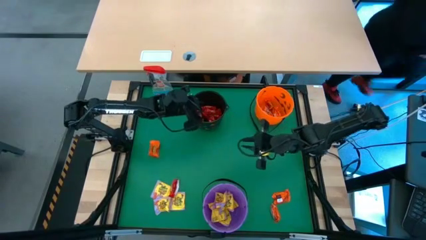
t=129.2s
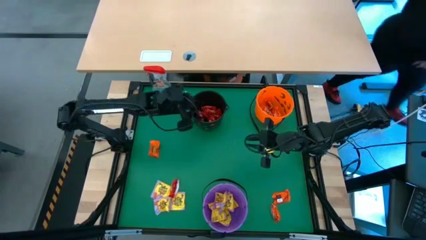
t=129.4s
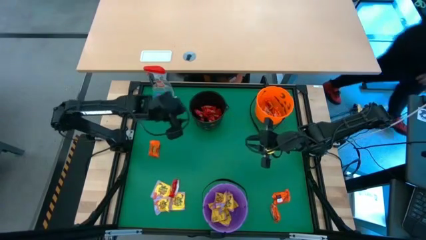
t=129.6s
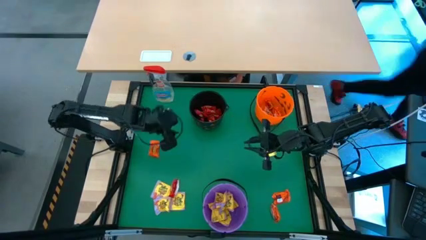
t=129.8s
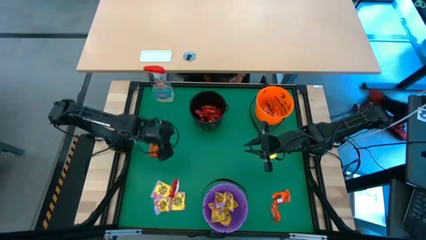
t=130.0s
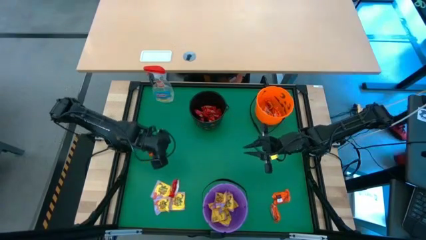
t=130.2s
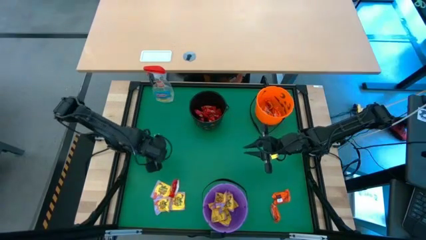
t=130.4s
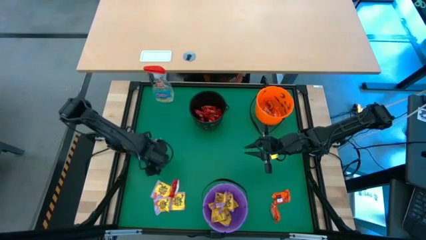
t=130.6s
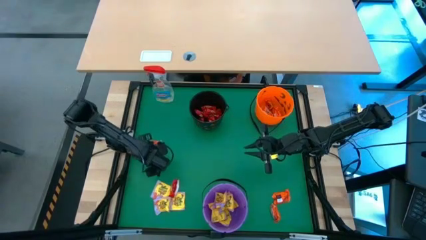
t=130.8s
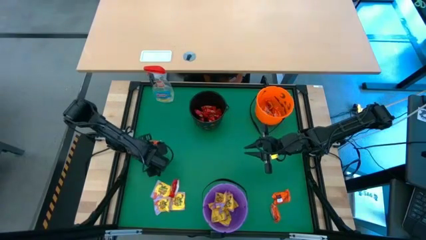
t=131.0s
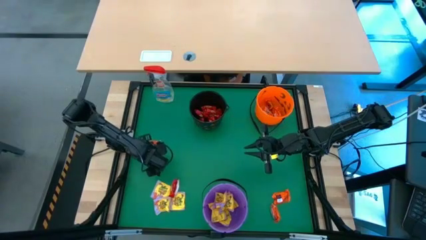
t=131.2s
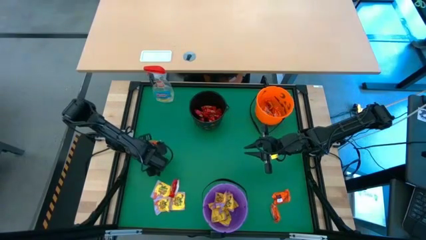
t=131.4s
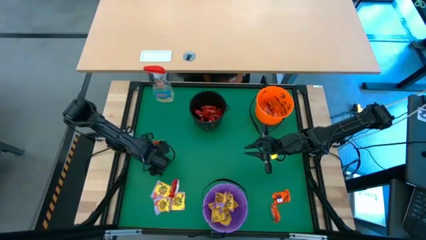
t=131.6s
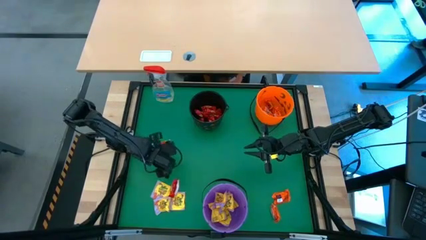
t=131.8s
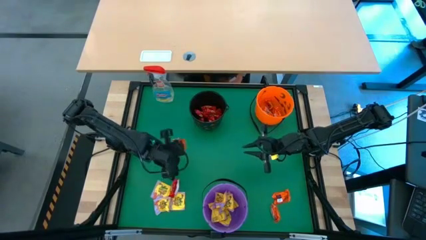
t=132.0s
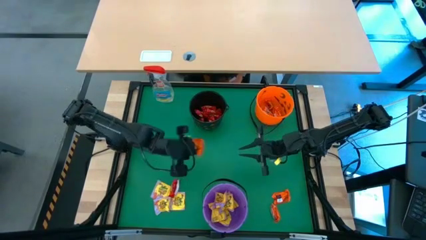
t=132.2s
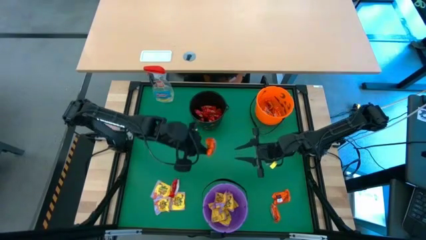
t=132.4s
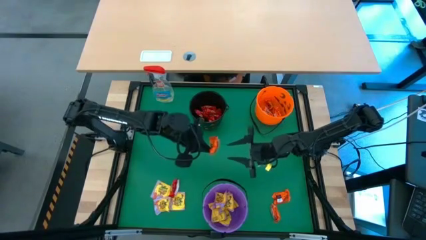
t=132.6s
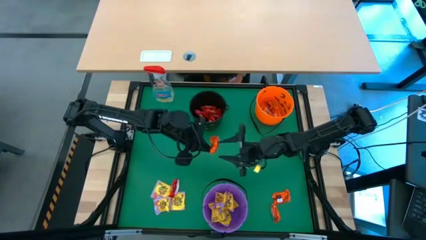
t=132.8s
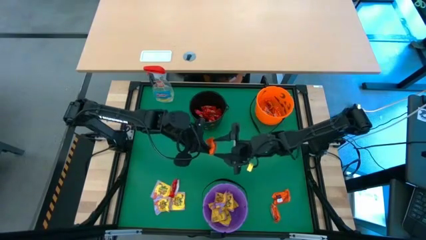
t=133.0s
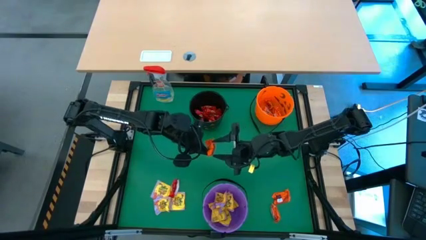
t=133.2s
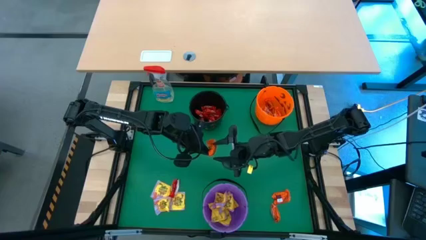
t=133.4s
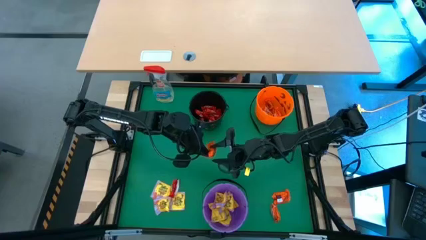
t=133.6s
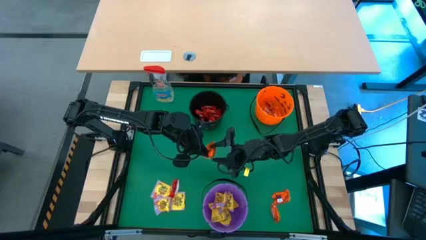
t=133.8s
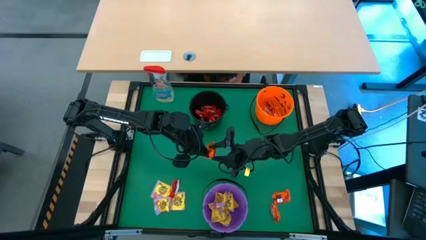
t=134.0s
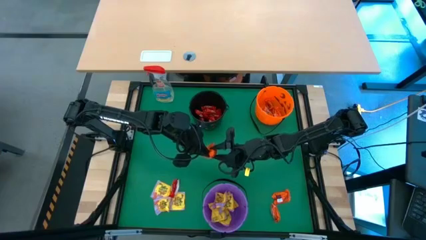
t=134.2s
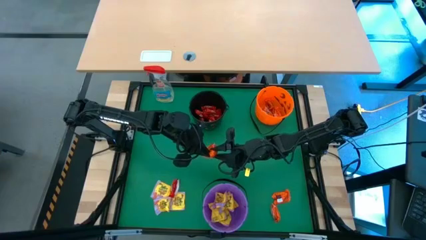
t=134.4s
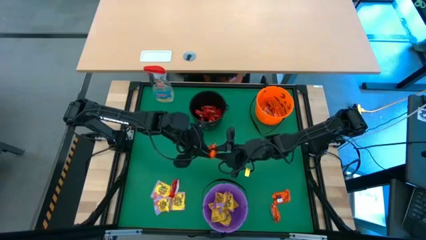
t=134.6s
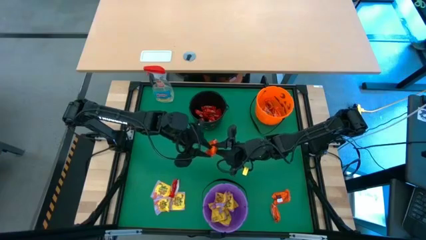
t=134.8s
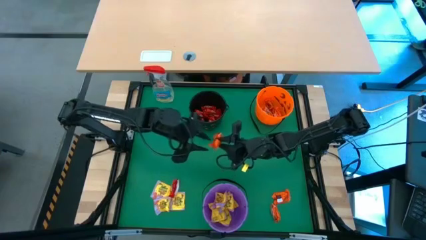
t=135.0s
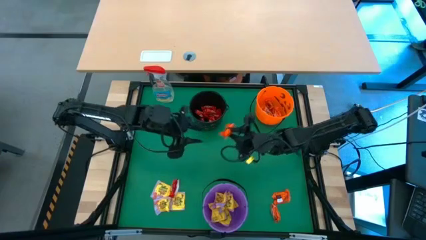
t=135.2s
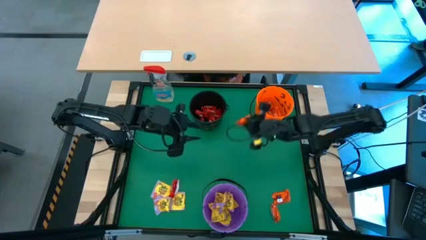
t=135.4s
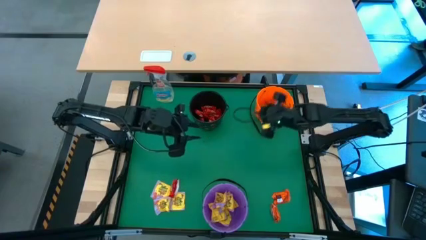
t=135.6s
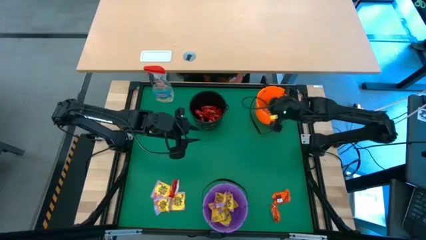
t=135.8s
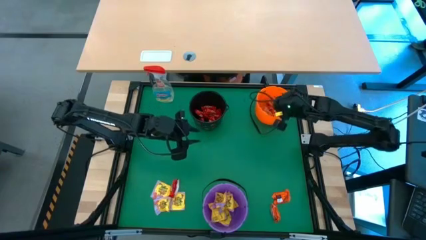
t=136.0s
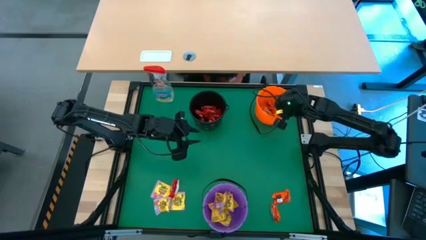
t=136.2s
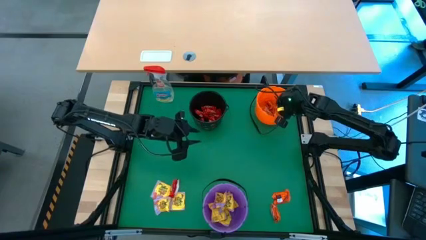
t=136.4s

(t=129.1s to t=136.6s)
Task: Sort candy
Put the orange chocolate into the orange bucket

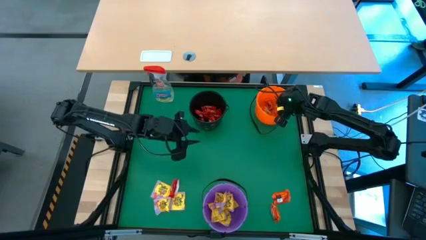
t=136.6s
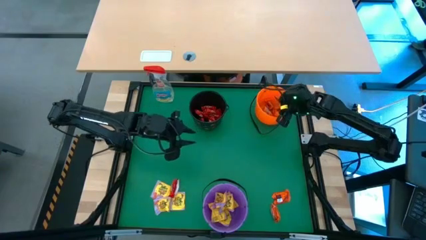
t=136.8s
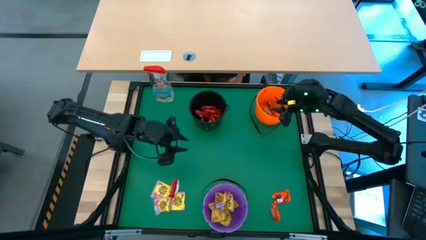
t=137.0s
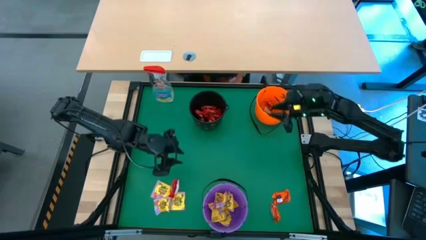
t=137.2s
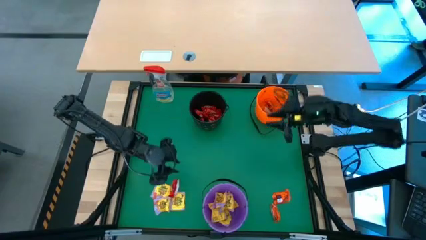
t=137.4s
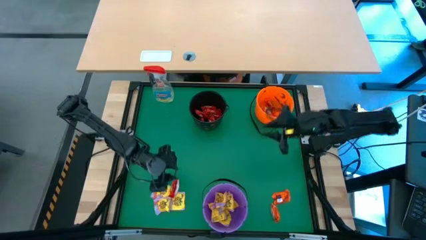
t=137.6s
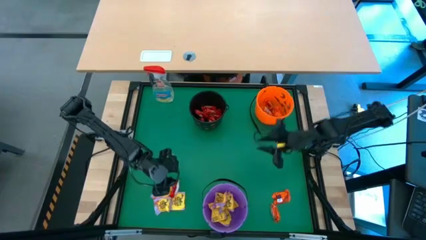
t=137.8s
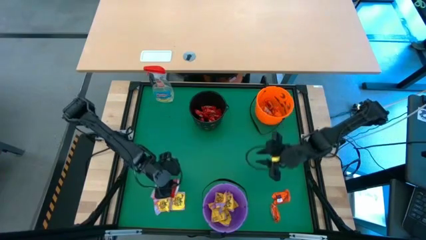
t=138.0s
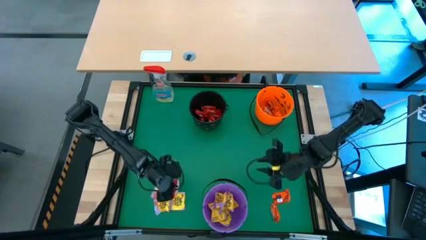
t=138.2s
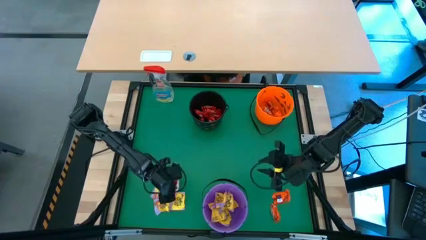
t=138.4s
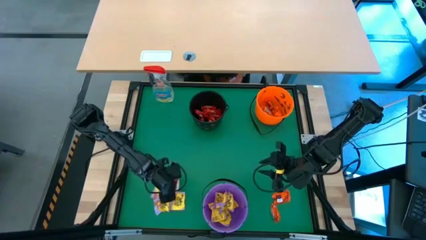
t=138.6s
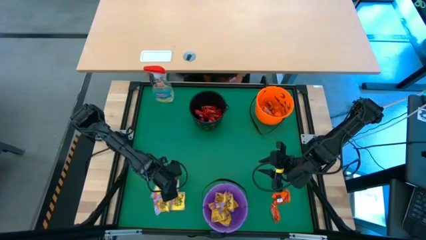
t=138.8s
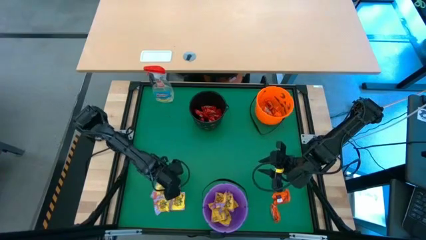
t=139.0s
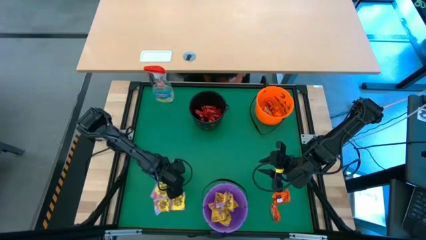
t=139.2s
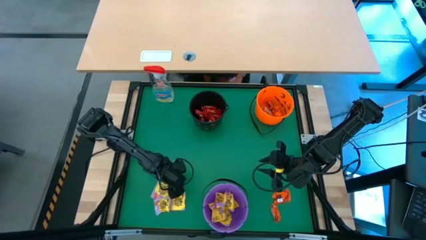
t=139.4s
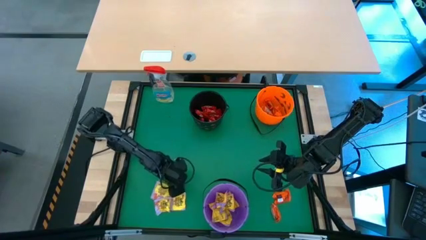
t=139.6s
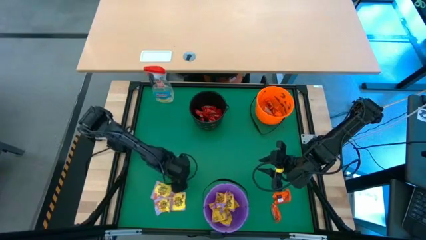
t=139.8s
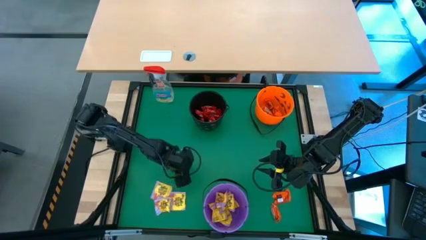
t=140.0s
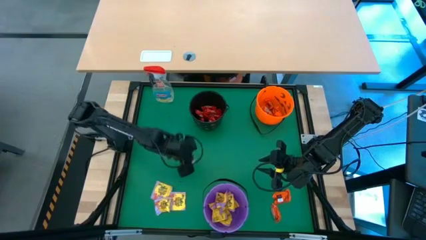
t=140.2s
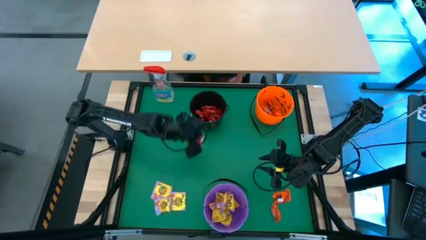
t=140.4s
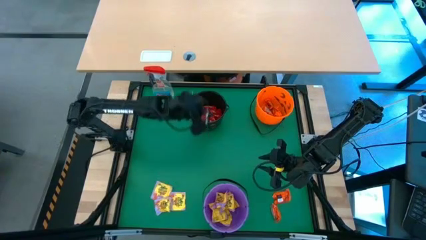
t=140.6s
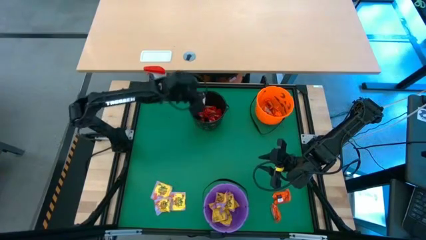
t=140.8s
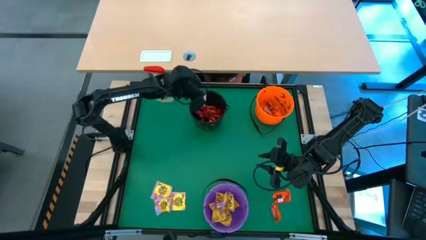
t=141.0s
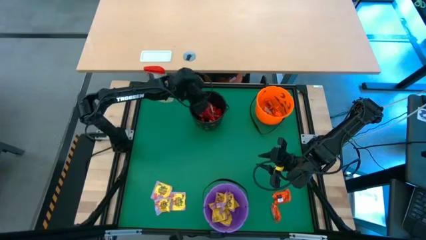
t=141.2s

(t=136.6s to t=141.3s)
Put the red chocolate into the black bucket

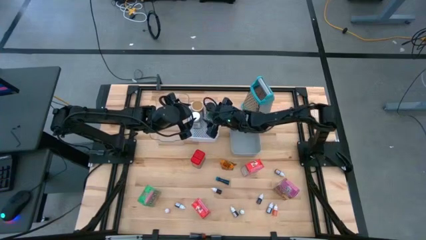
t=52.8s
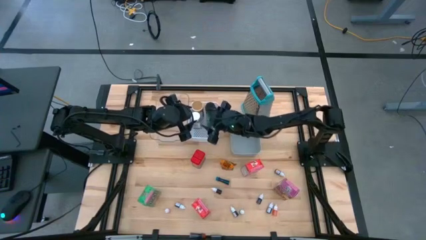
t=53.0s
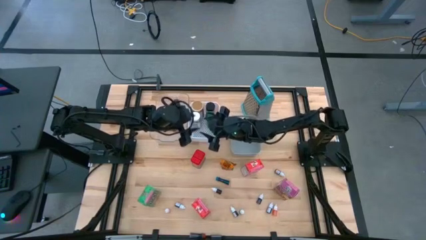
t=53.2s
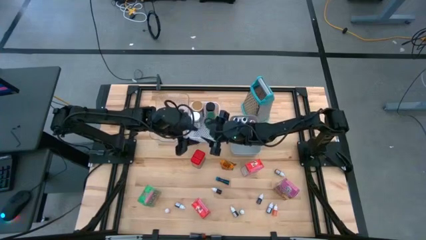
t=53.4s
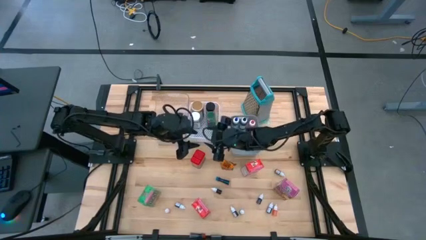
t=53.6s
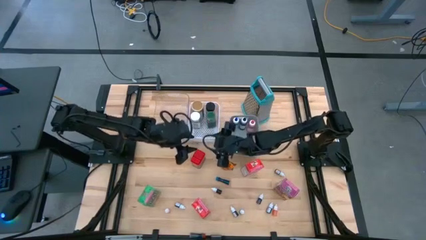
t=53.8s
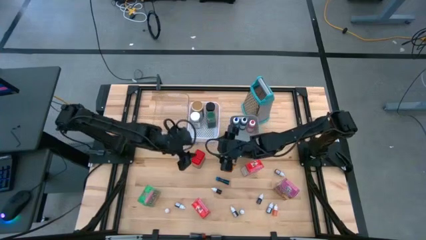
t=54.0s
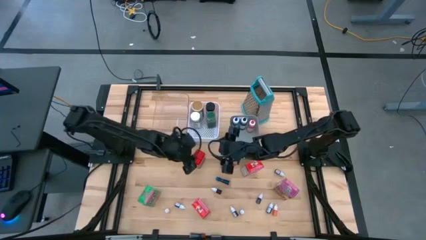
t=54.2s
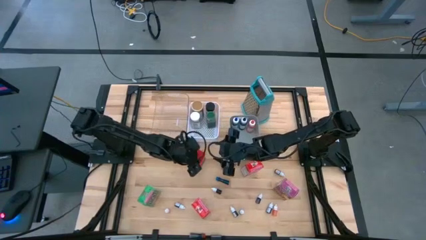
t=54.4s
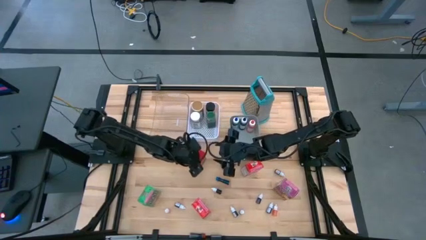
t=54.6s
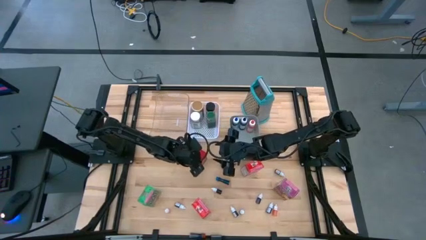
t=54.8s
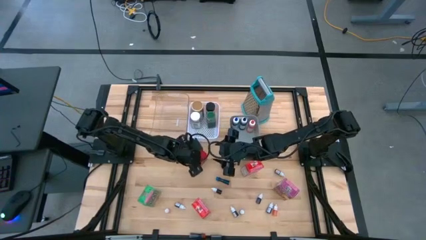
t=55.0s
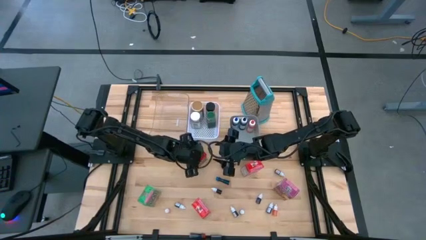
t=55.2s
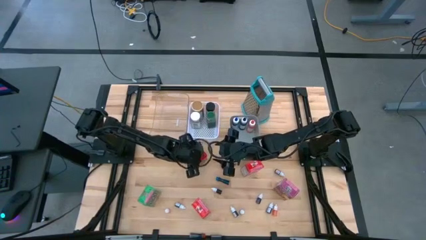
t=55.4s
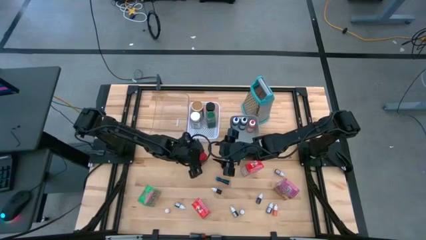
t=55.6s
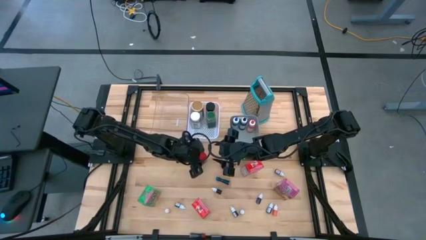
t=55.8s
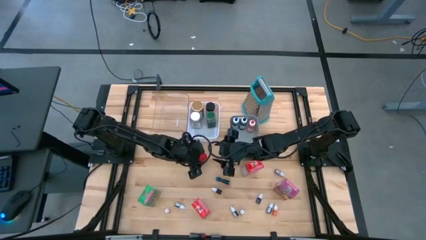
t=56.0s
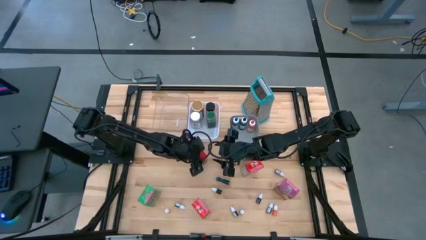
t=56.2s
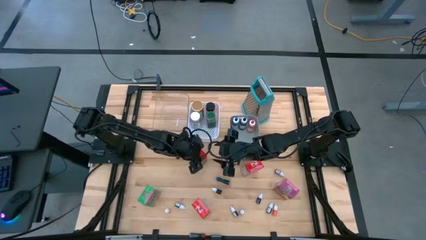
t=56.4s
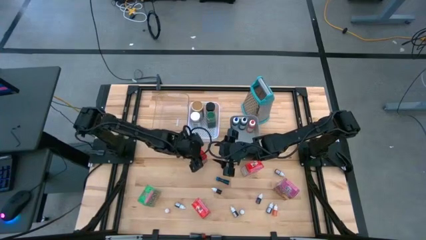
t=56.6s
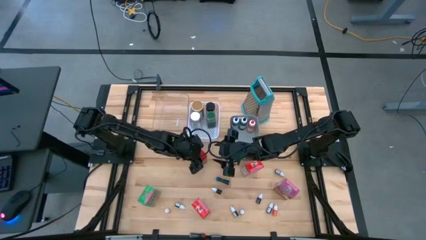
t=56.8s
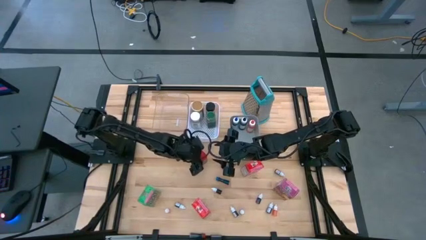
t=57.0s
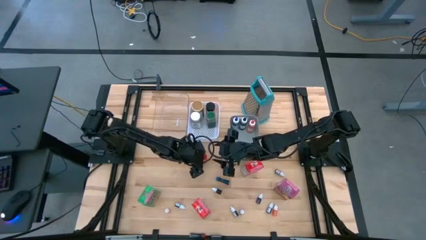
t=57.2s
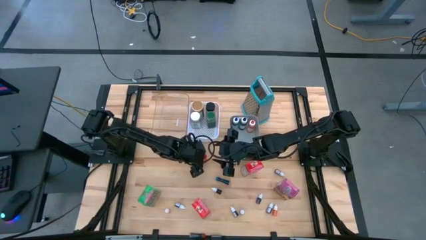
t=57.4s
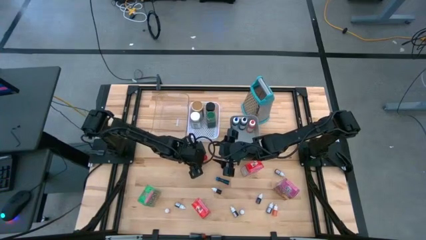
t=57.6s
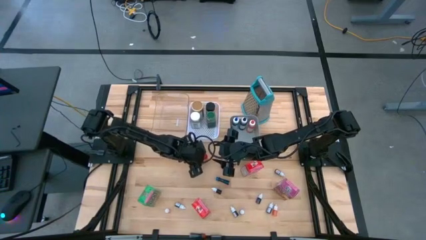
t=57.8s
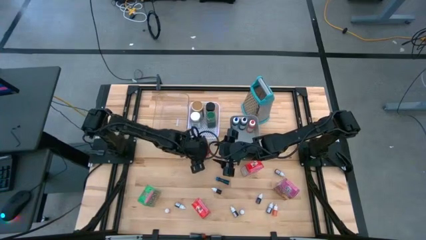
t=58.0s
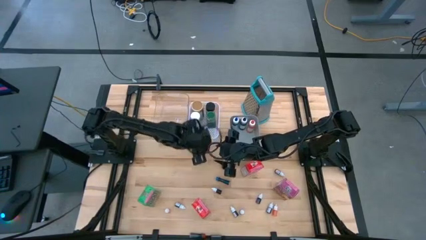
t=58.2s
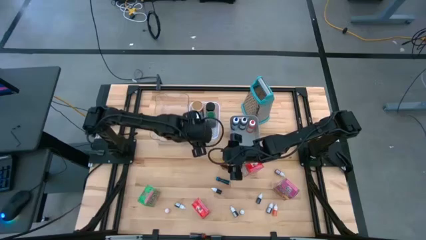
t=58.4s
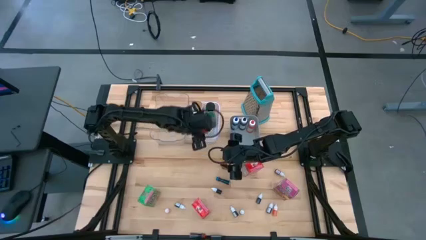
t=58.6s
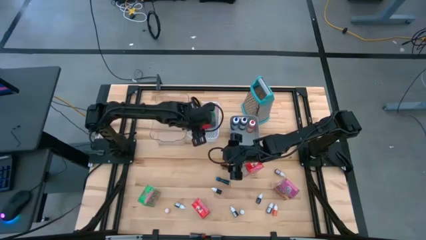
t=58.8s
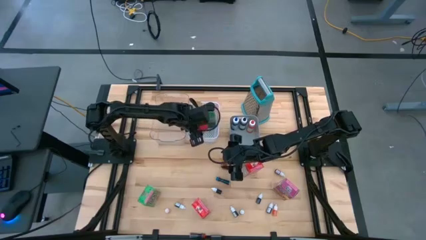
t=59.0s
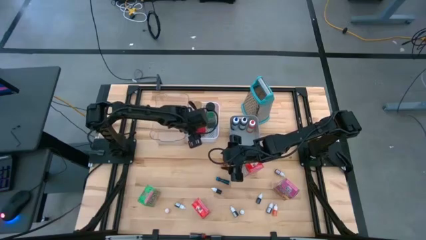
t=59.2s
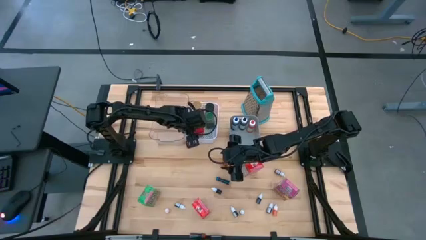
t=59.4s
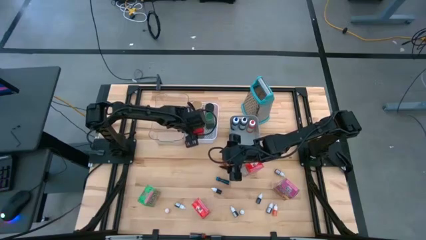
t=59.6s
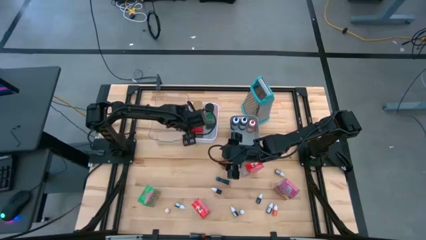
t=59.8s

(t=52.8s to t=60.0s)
Task: Pick & Place Kitchen Items
Put the red spice can into the white basket
